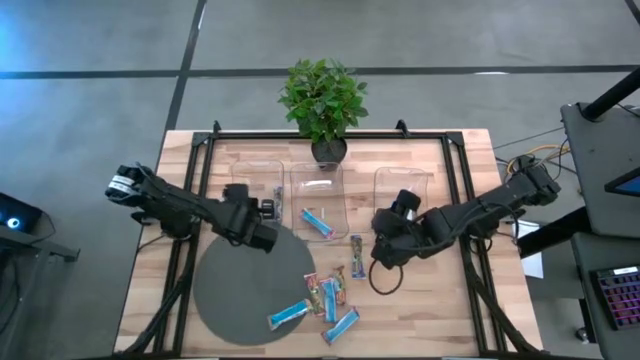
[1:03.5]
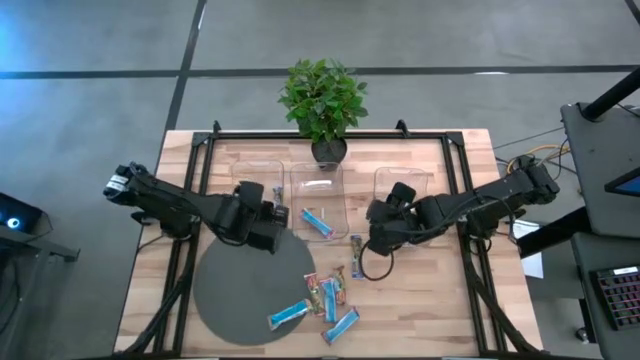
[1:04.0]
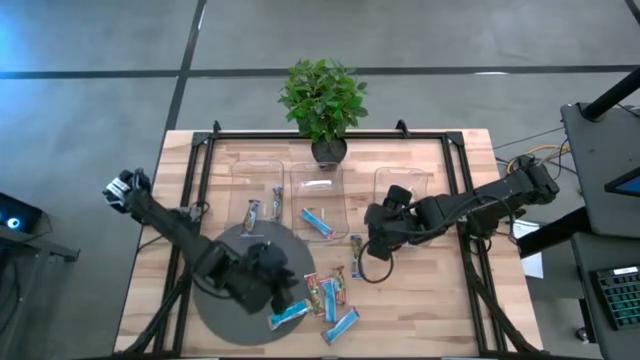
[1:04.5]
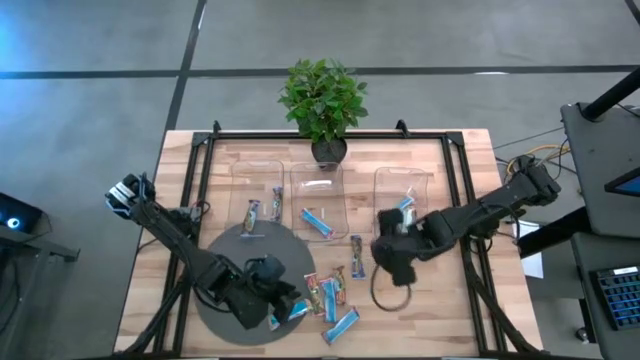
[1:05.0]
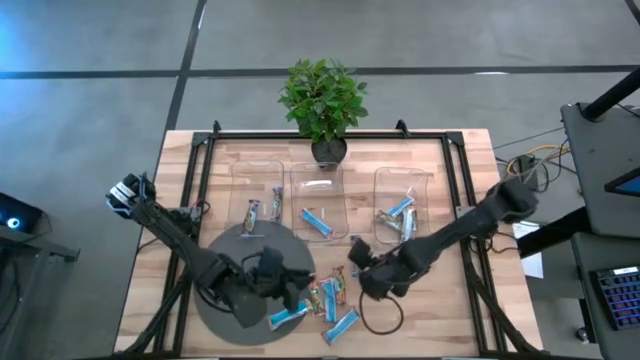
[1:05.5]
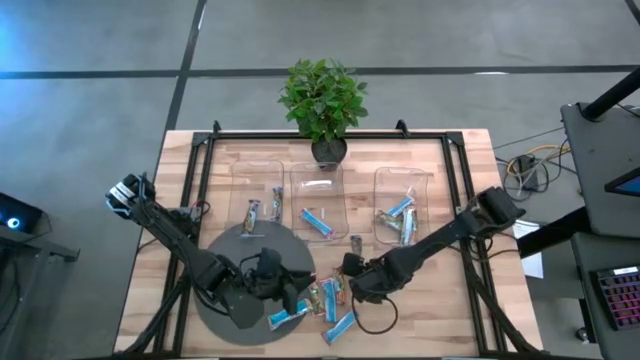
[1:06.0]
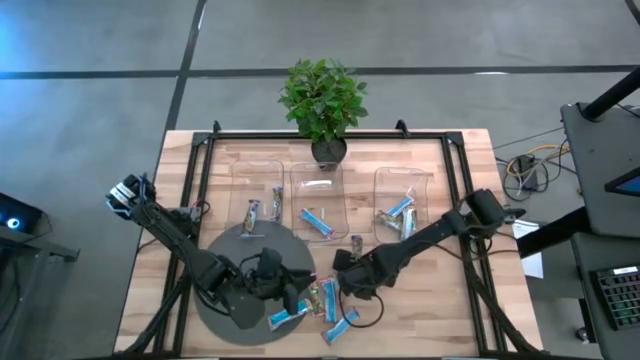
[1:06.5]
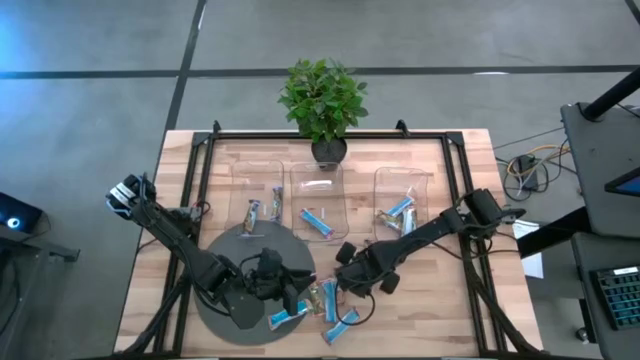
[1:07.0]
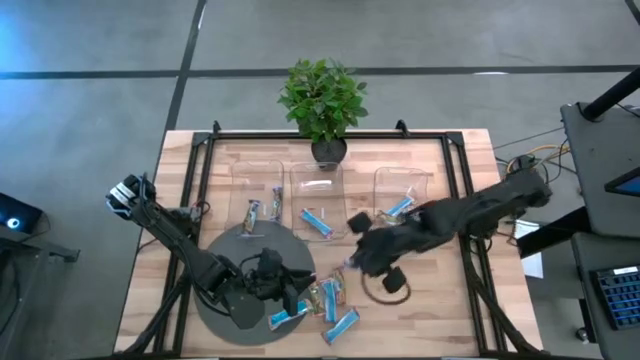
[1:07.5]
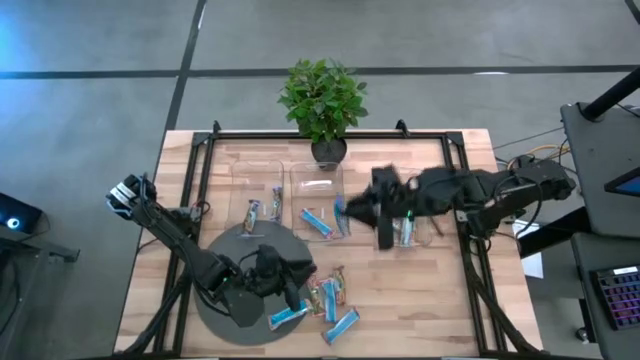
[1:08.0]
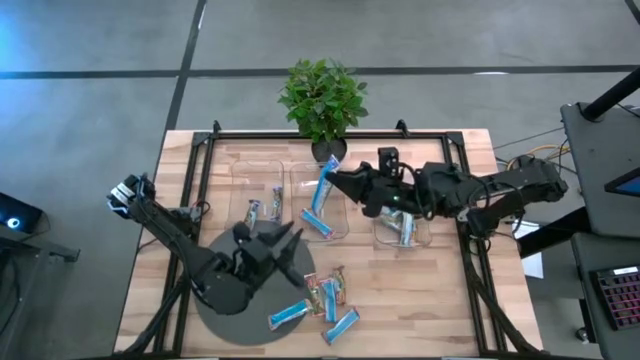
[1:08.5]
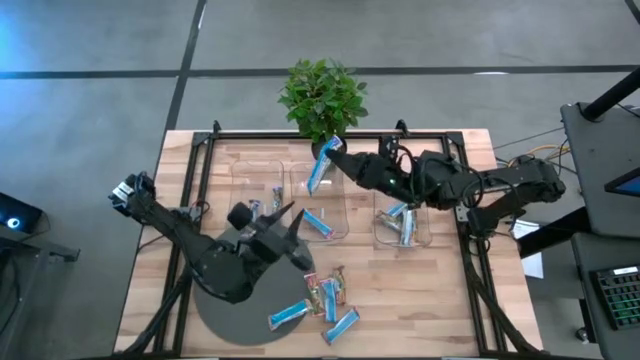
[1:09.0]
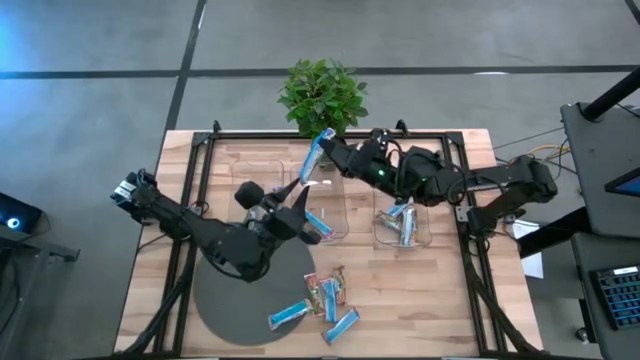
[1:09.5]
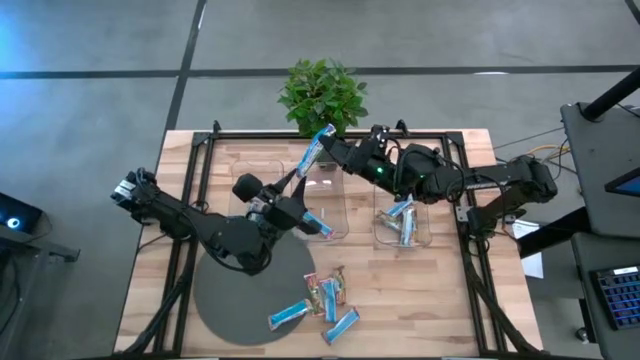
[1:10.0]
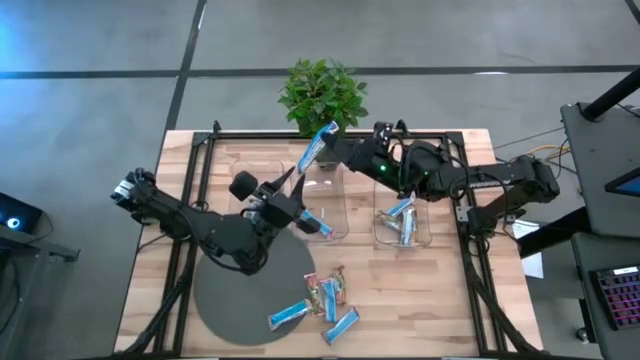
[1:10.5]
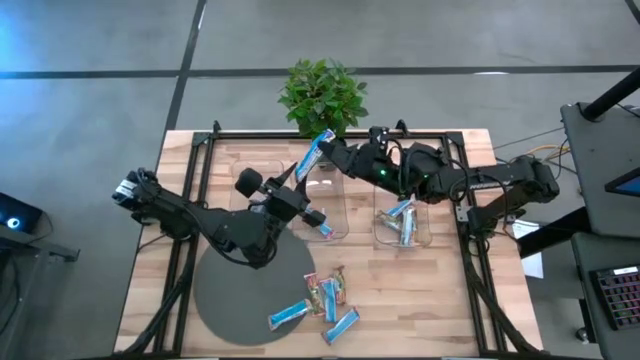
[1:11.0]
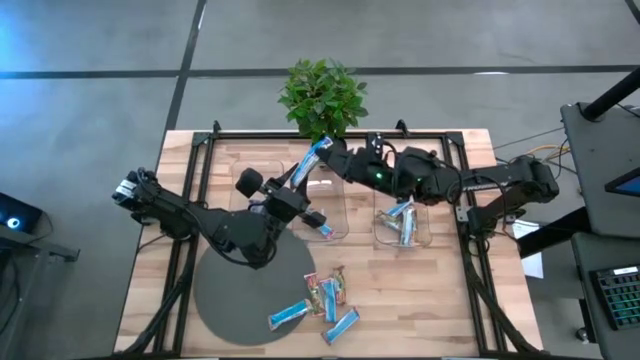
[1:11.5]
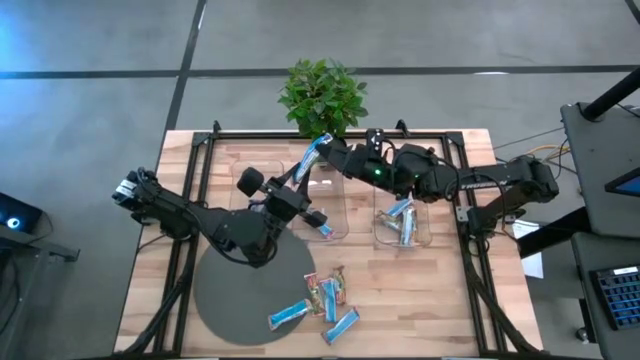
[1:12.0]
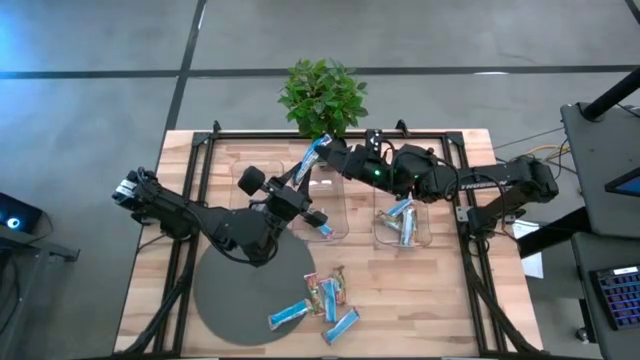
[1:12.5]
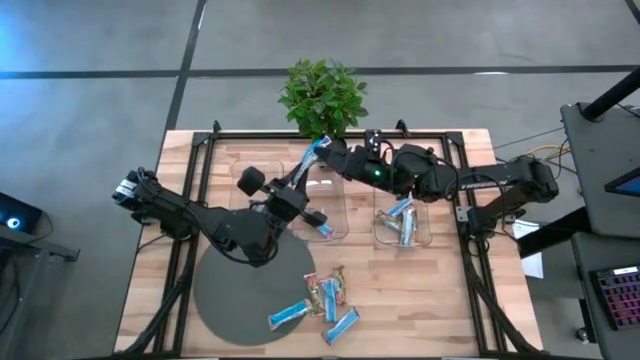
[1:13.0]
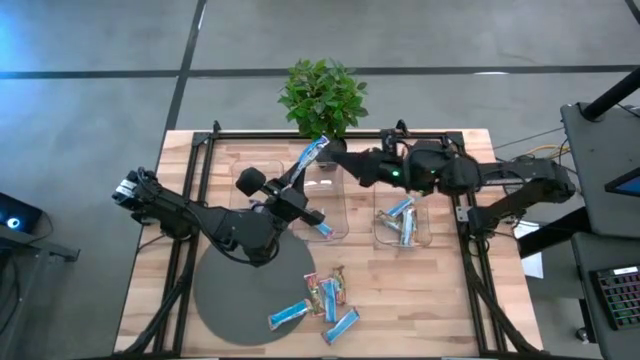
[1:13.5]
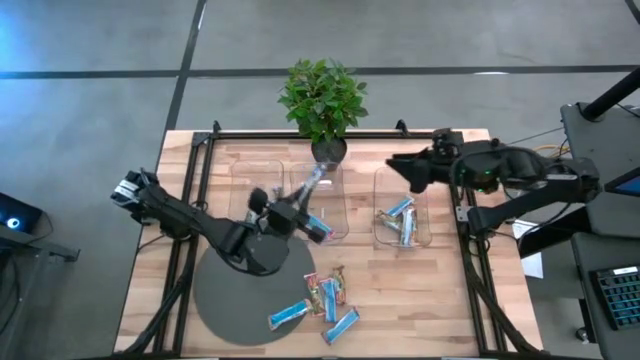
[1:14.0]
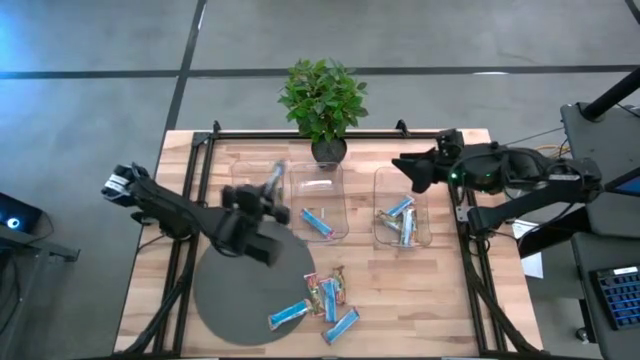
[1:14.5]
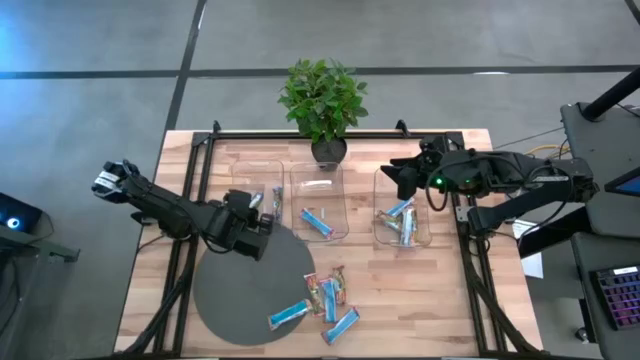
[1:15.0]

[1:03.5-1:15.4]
Task: Pick and place Granola Bars by type
Put the violet granola bar into the left transparent bin

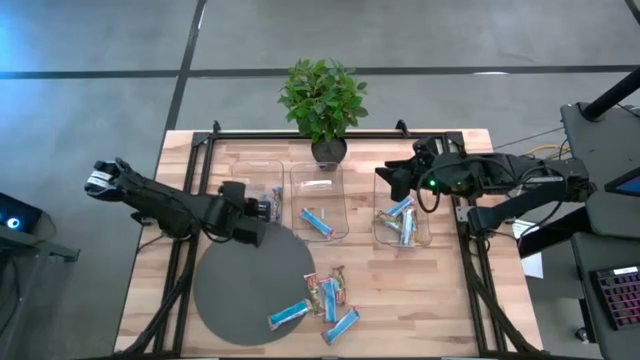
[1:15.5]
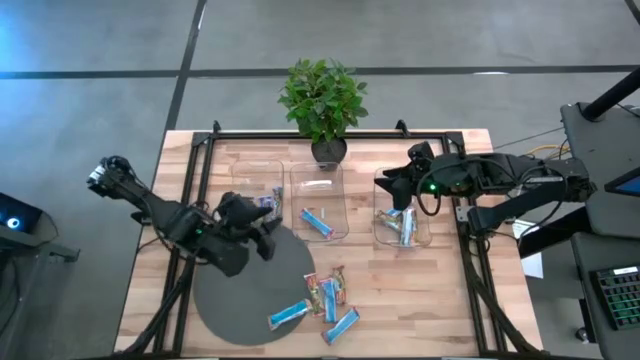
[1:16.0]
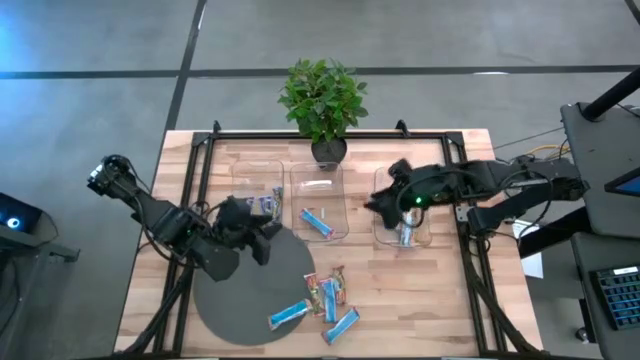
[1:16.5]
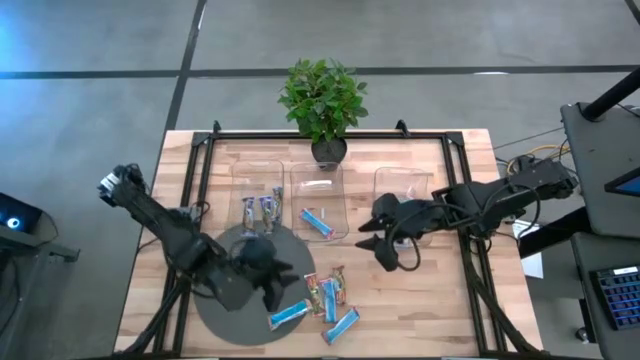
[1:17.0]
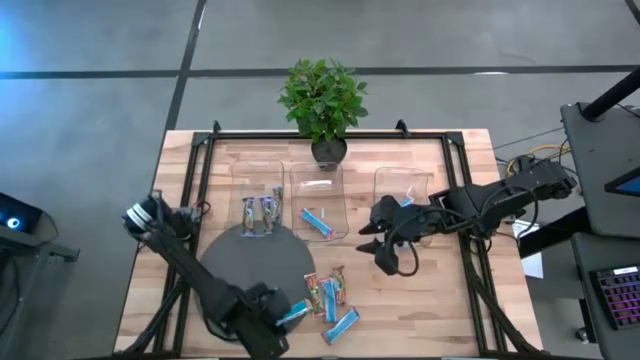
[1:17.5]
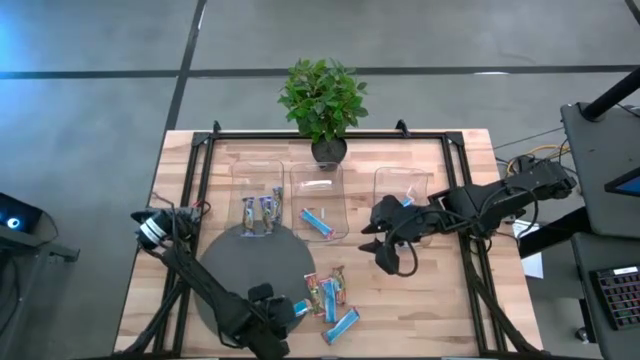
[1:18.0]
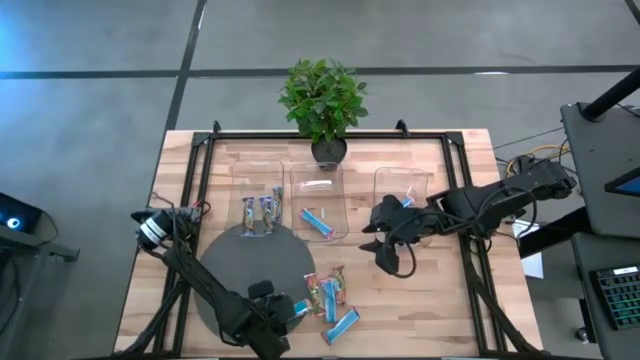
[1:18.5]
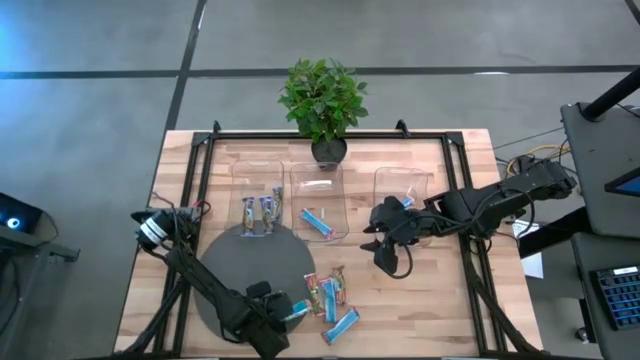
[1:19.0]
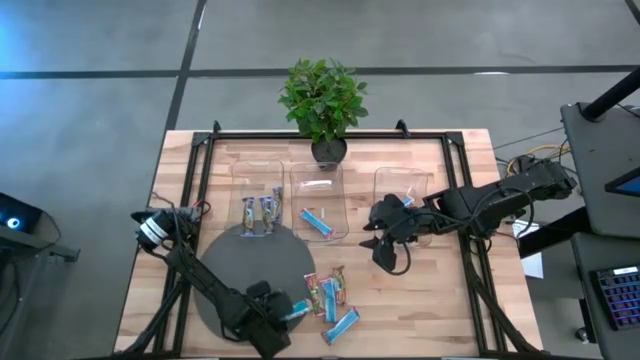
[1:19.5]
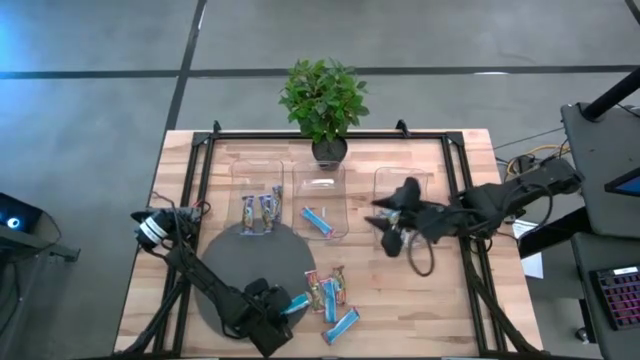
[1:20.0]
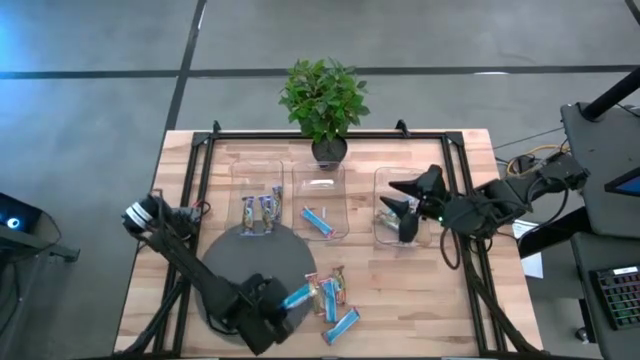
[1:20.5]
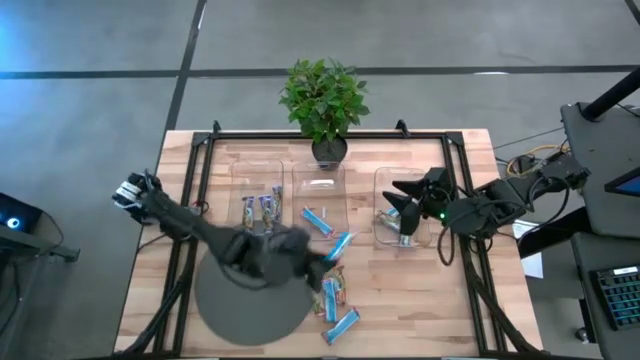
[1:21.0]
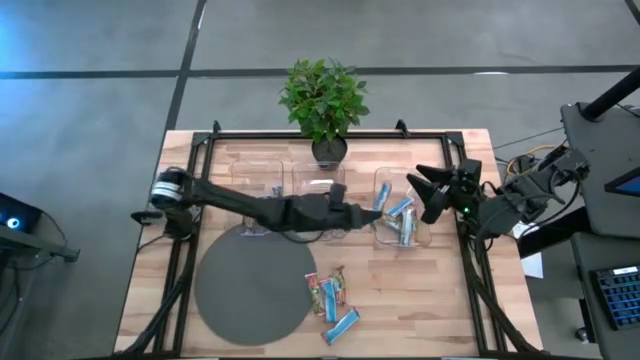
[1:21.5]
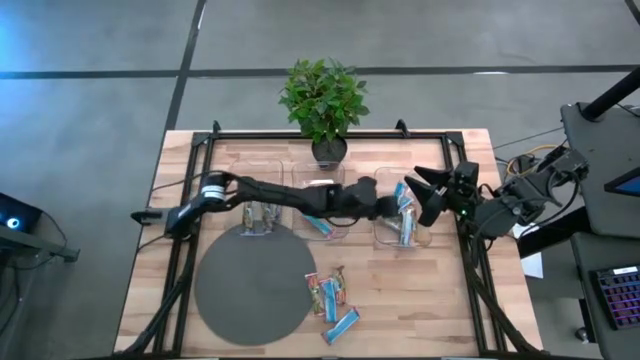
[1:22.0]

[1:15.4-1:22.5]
Put the yellow granola bar into the right transparent bin

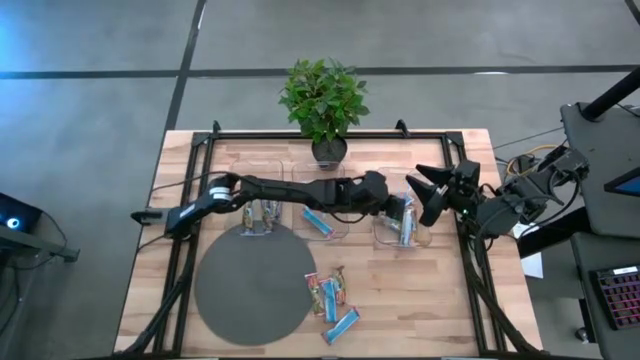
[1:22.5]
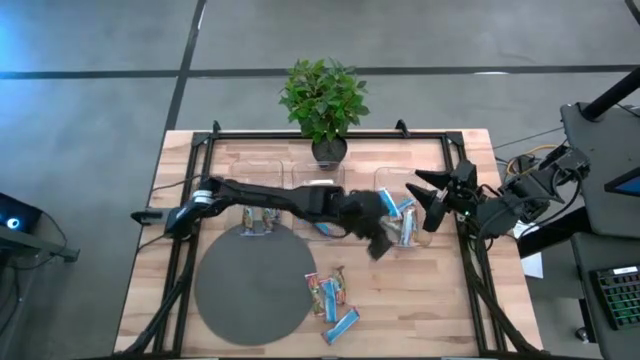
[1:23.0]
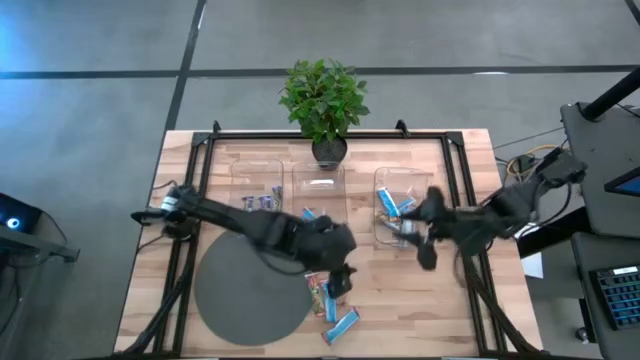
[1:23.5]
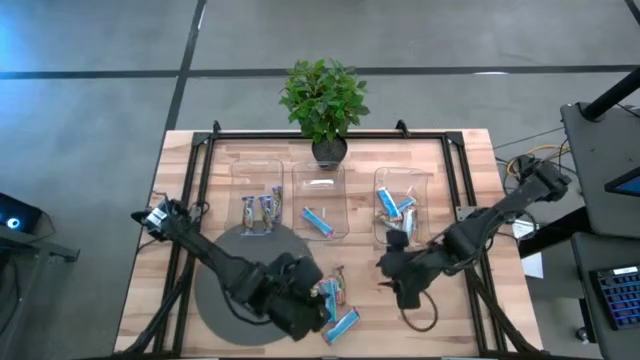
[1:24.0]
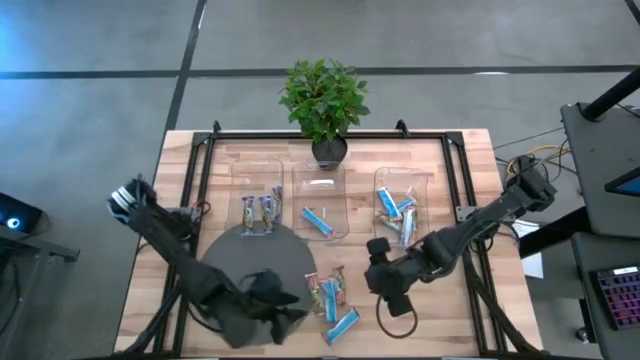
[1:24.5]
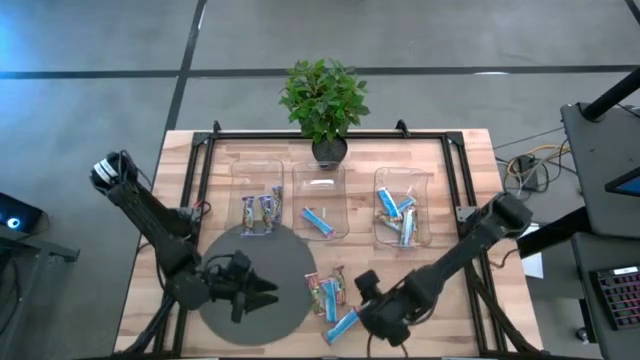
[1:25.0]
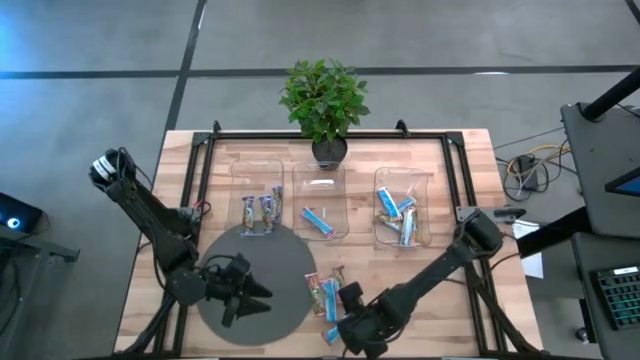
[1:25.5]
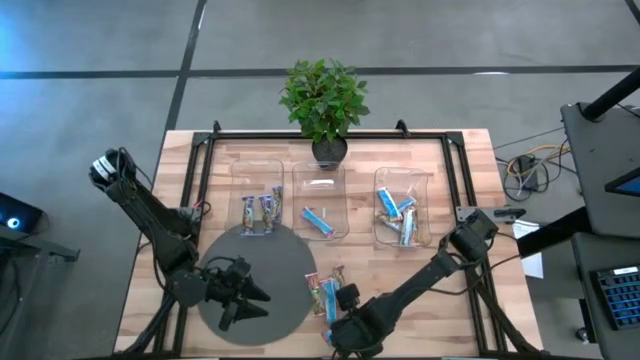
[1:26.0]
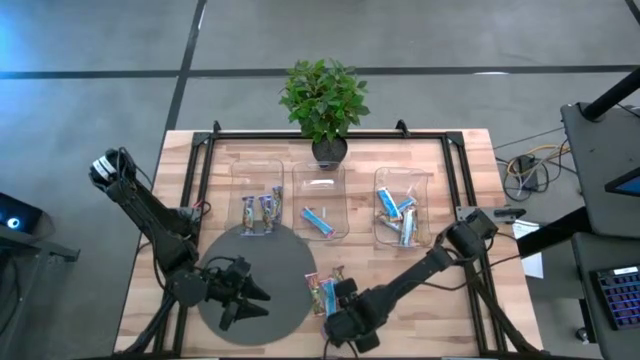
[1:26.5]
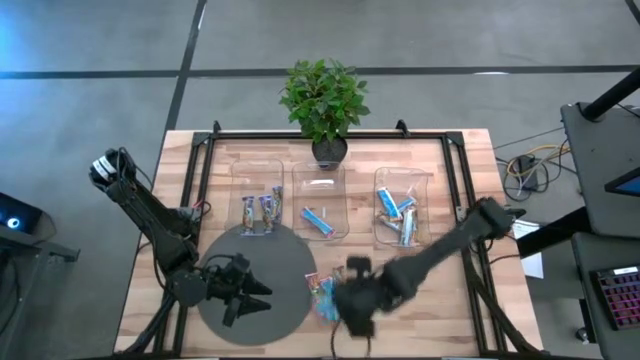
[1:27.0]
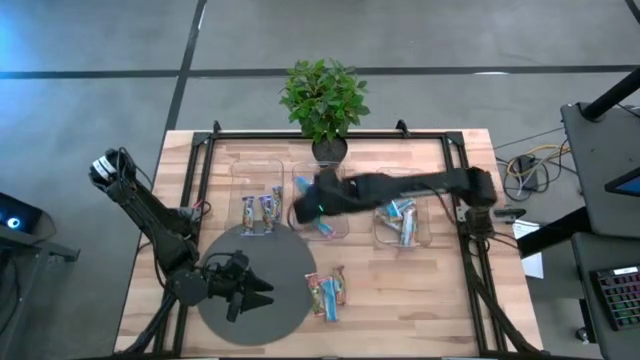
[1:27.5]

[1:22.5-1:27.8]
Put the red granola bar into the middle transparent bin
